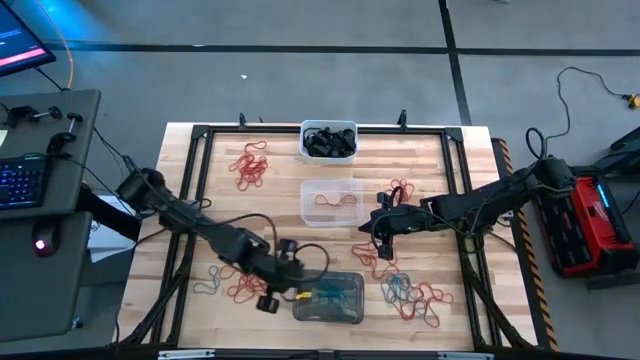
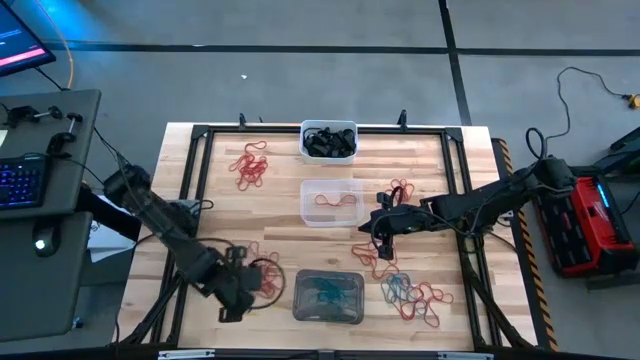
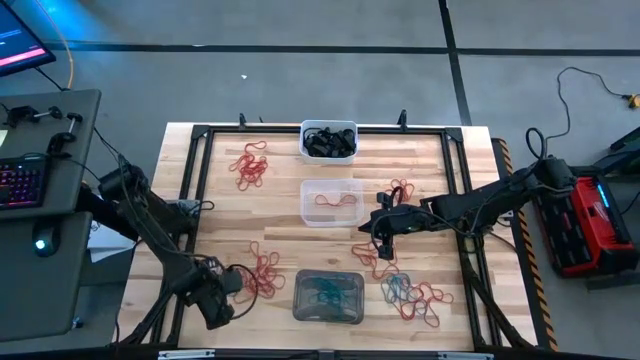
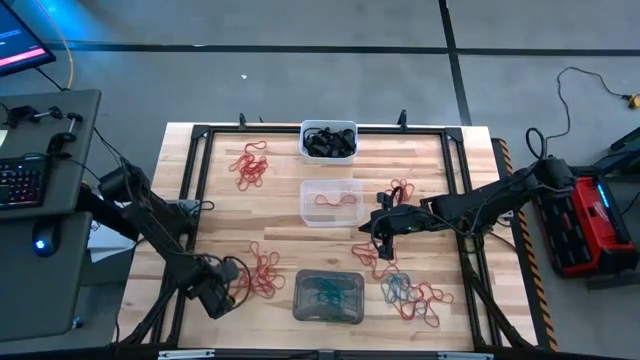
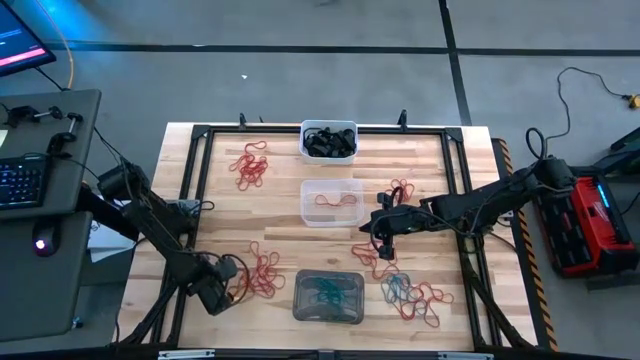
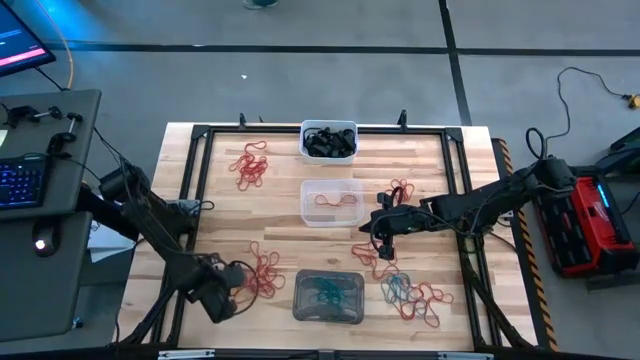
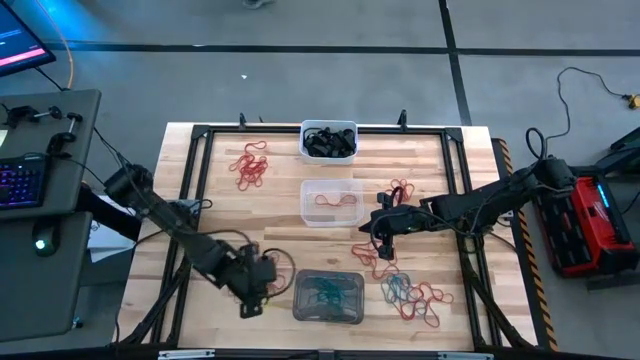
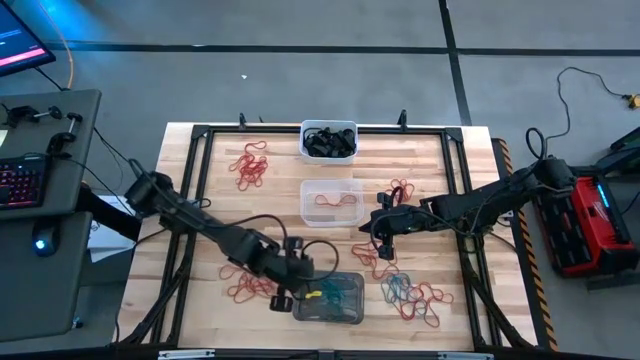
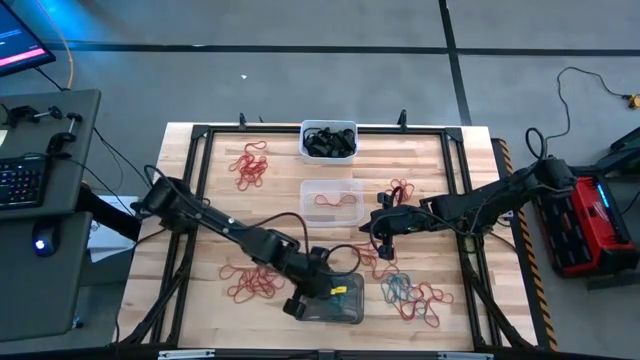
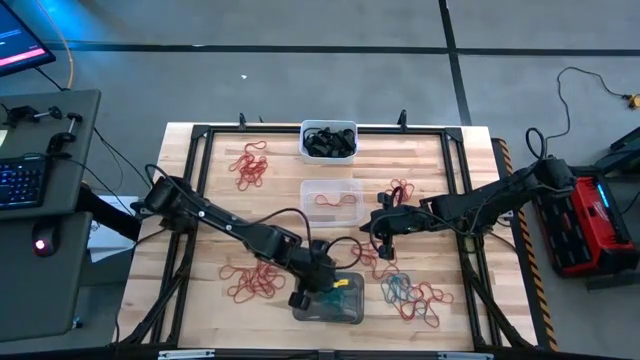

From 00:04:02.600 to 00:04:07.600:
Task: Sort rubber bands into baskets
Put the blue rubber band into the black bin

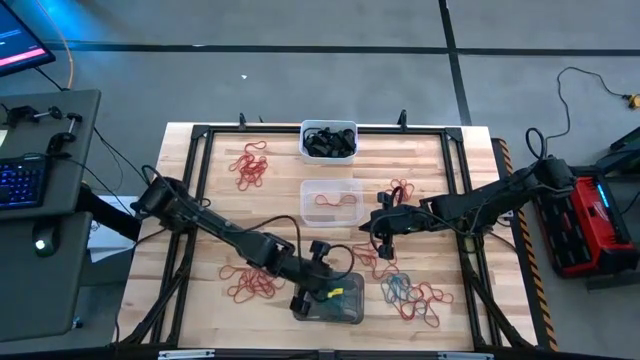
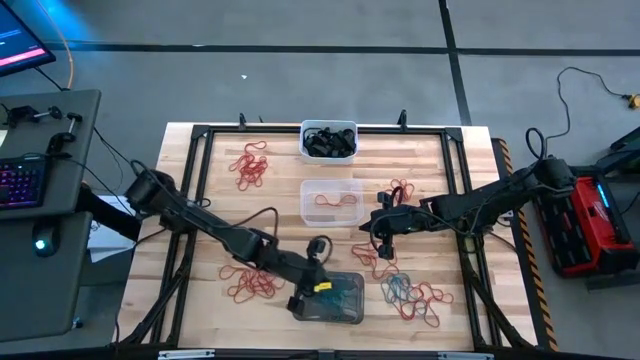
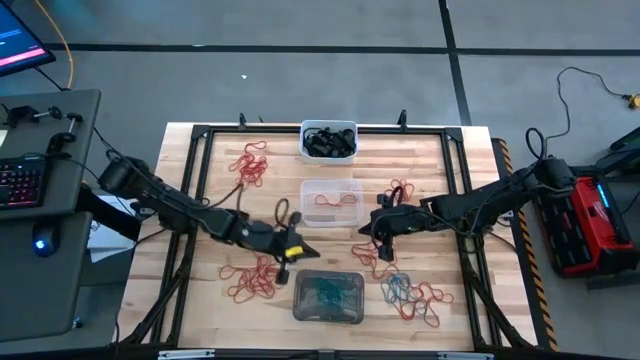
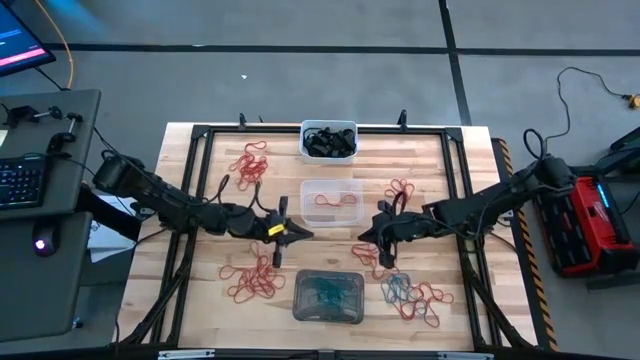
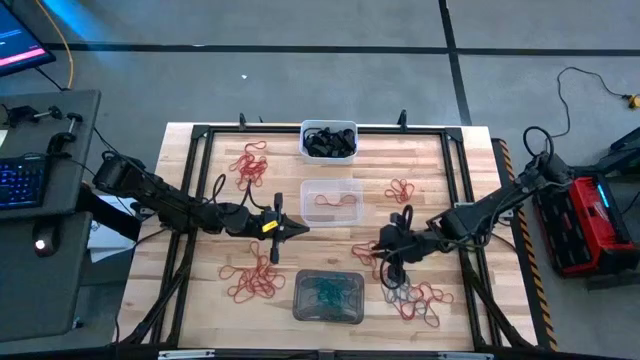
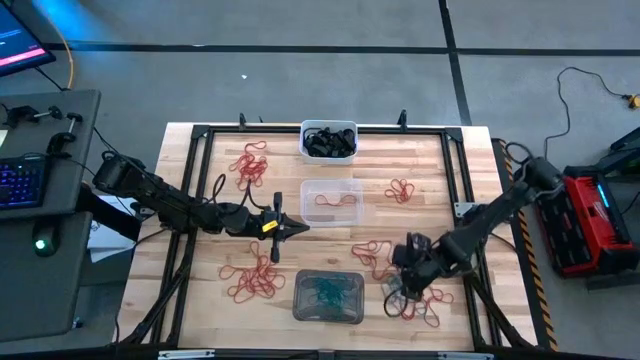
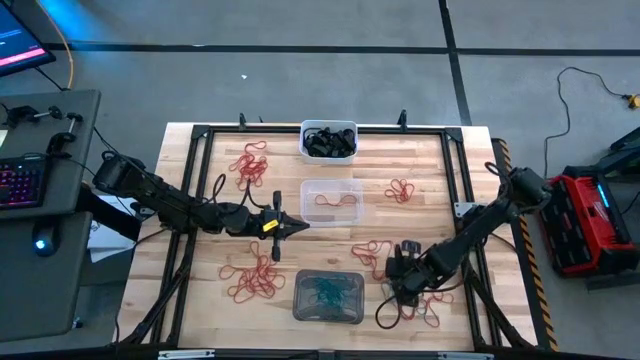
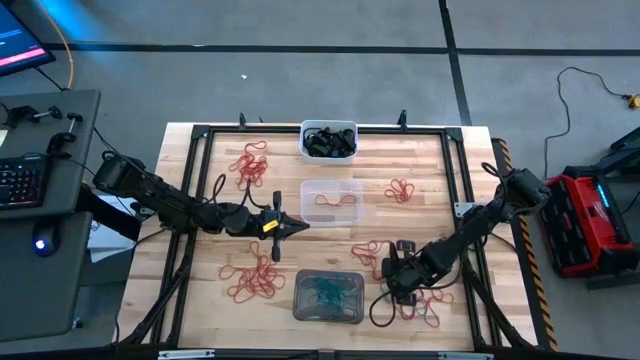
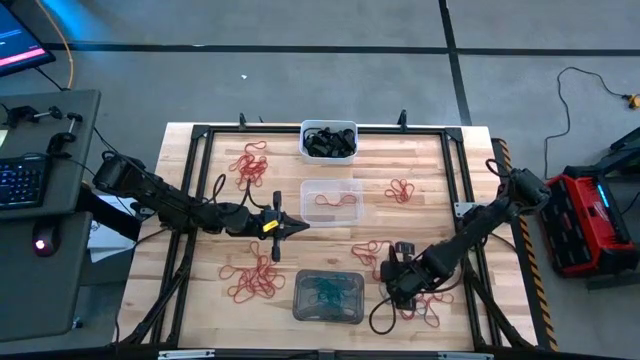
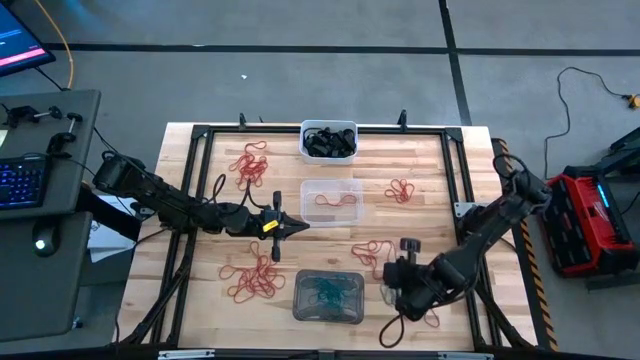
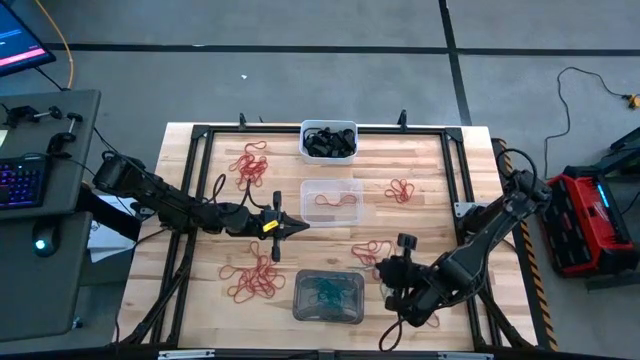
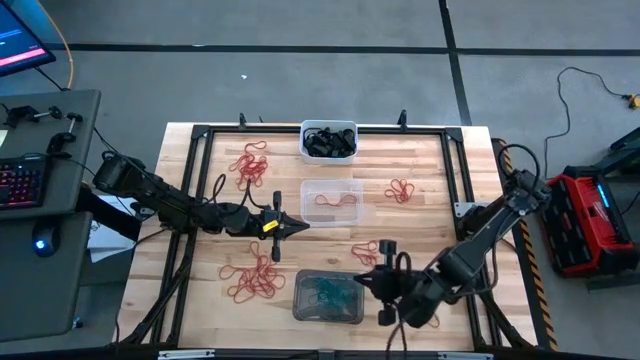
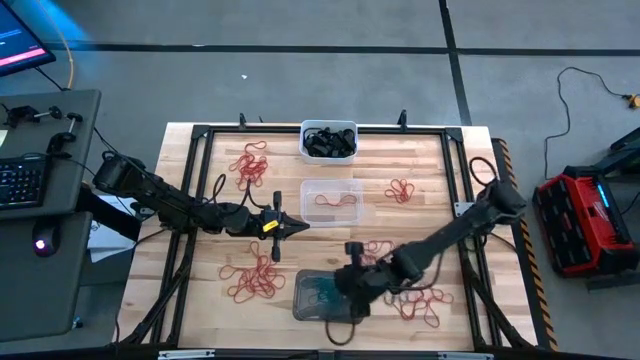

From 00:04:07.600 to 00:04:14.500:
Put the blue rubber band into the black bin

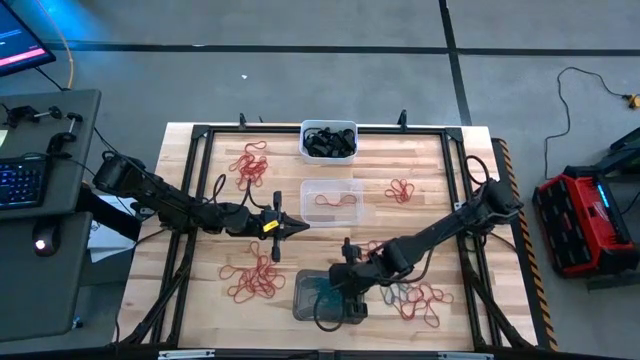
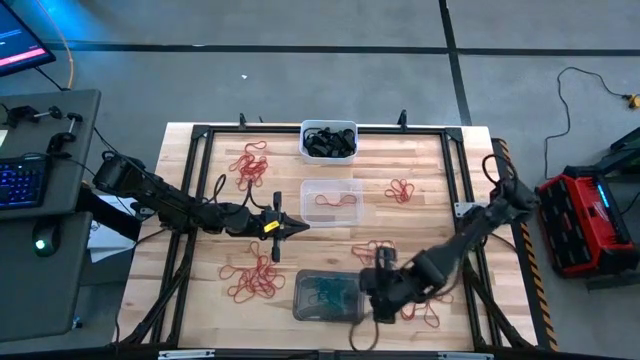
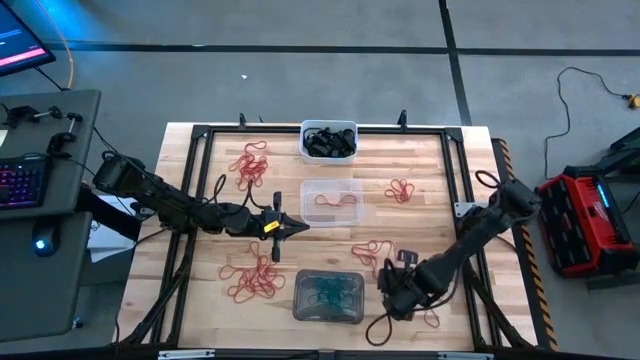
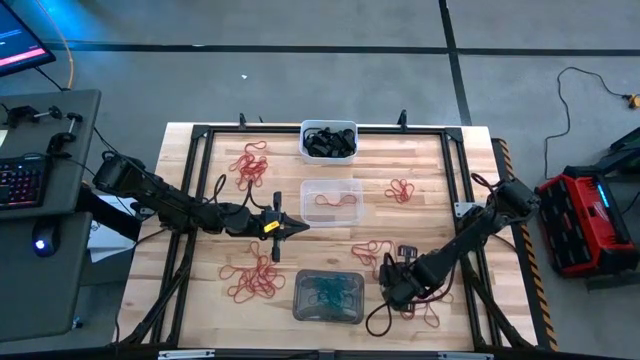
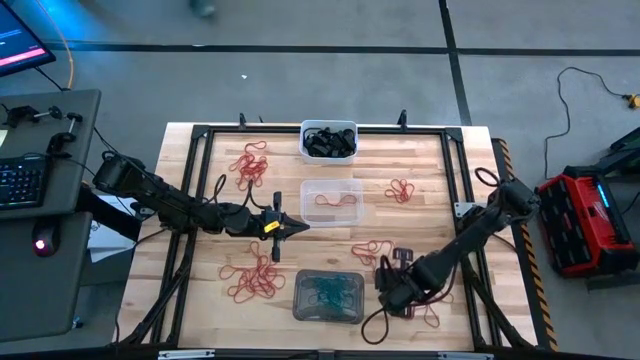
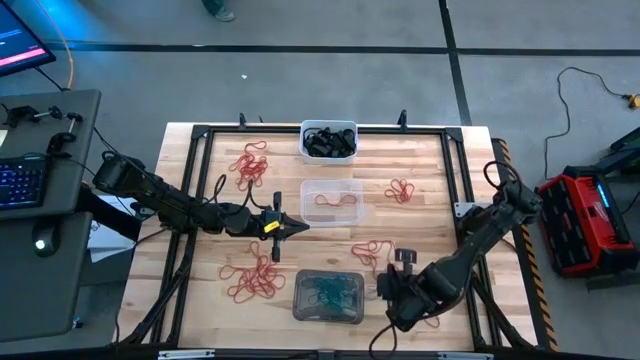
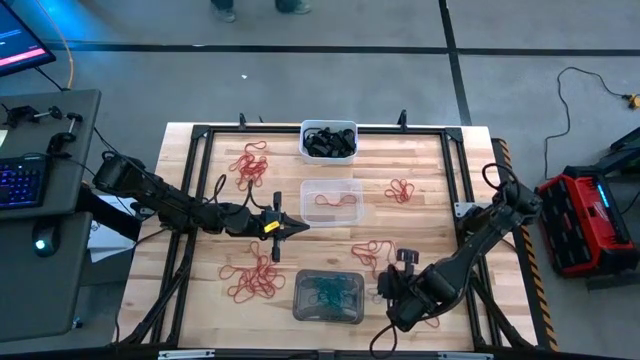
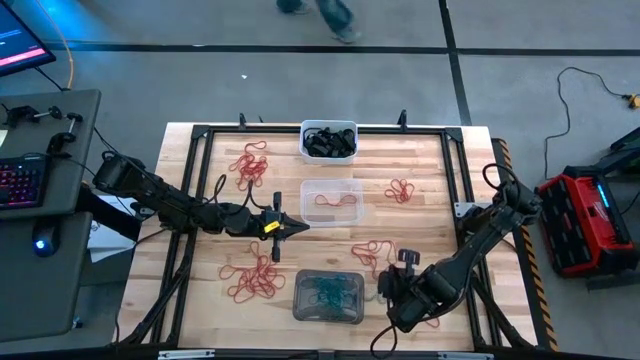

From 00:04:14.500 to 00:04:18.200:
Put the blue rubber band into the black bin

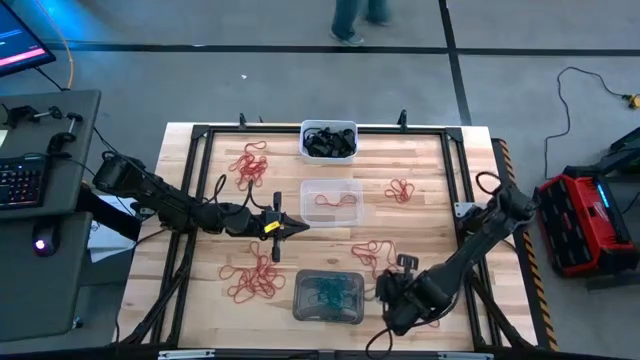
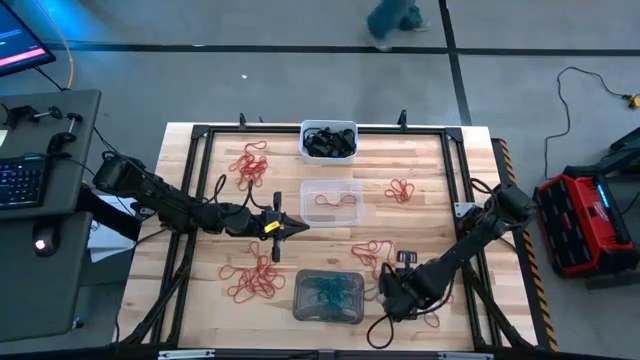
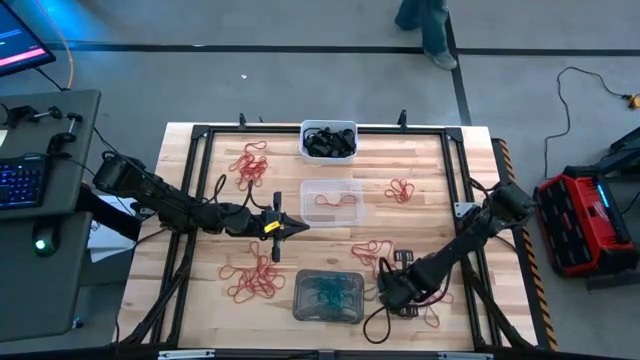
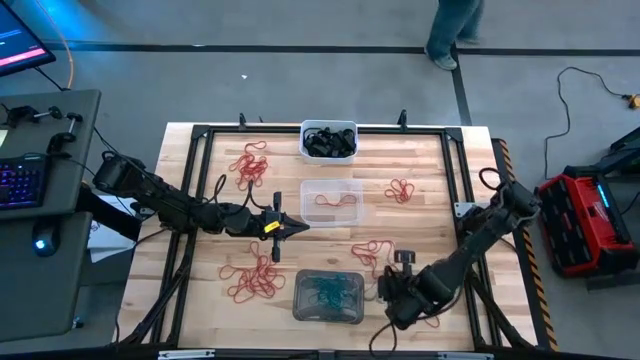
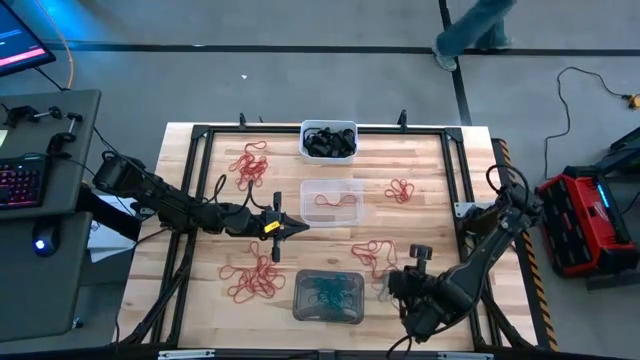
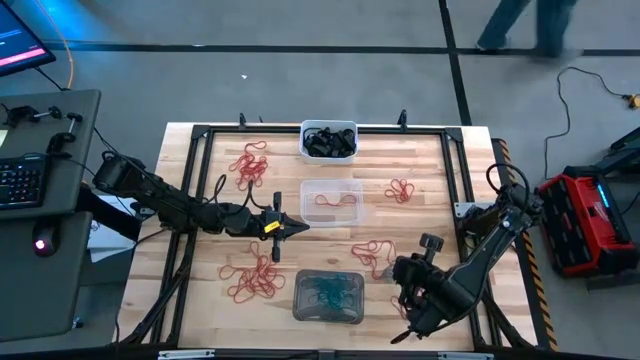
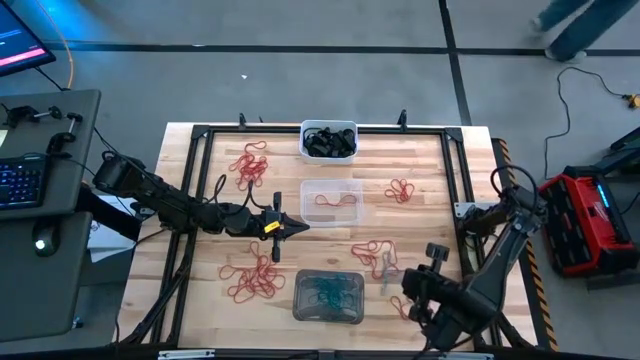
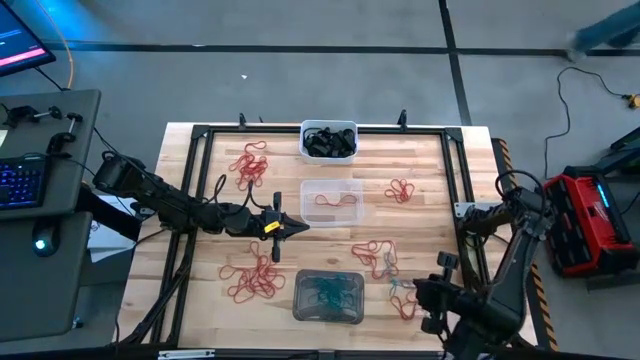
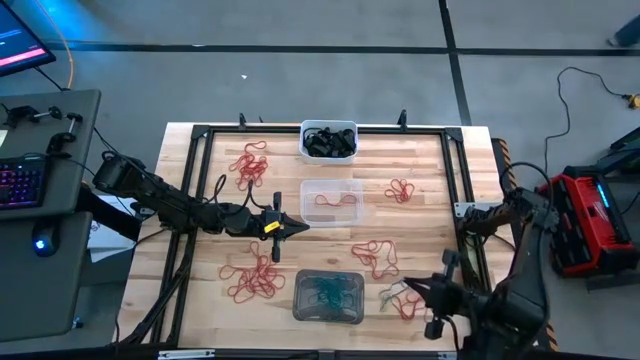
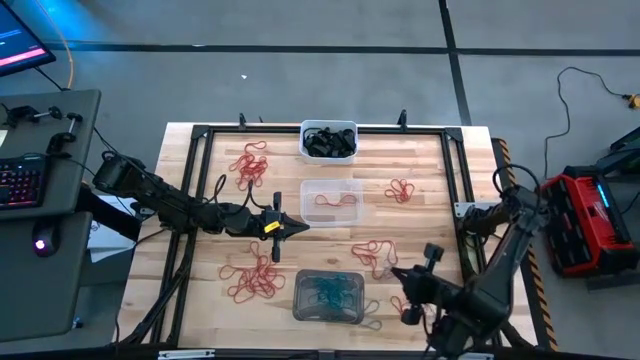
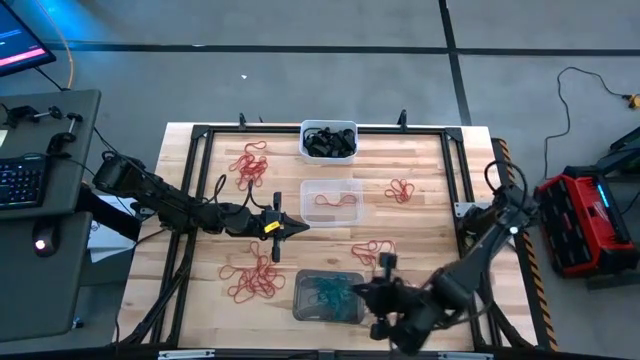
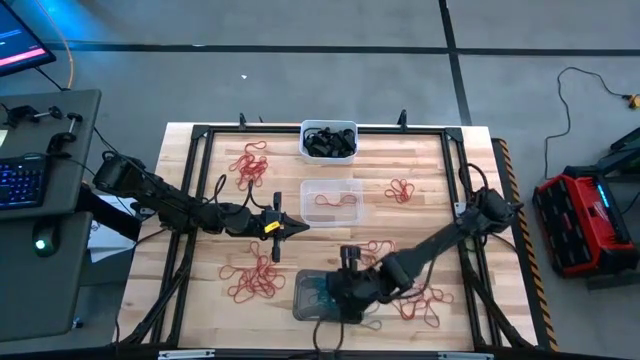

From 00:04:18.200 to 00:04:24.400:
Put the blue rubber band into the black bin
